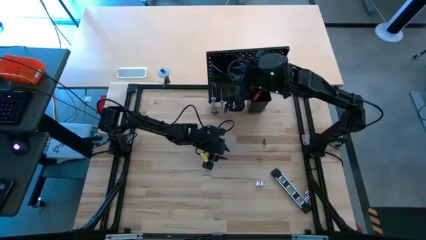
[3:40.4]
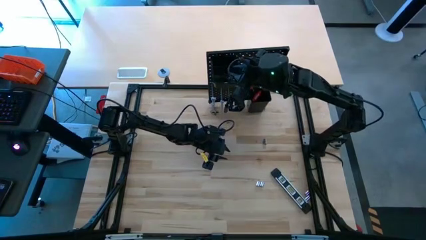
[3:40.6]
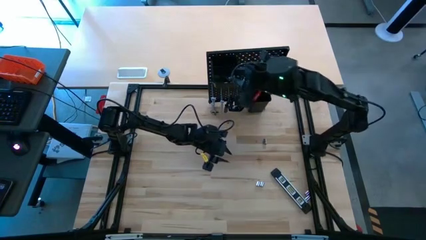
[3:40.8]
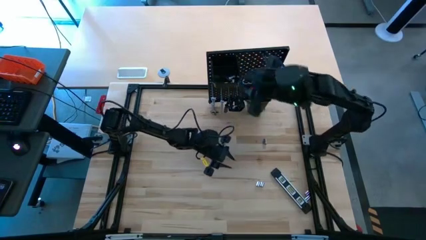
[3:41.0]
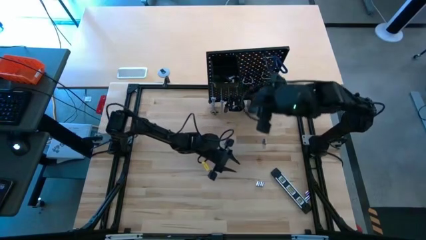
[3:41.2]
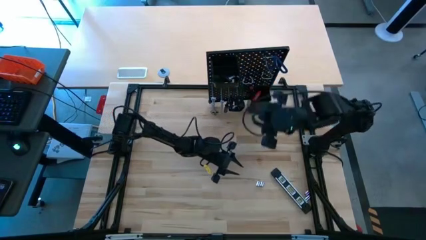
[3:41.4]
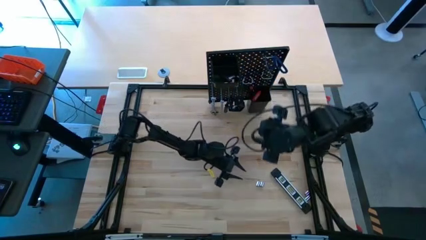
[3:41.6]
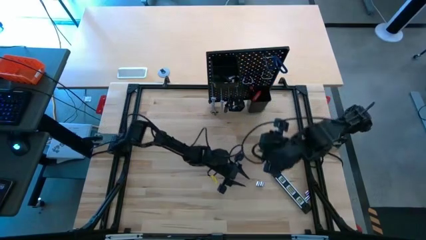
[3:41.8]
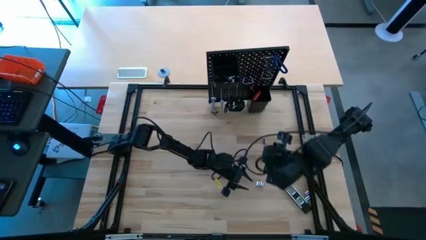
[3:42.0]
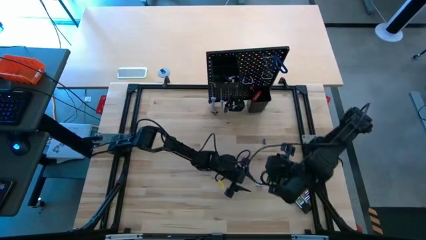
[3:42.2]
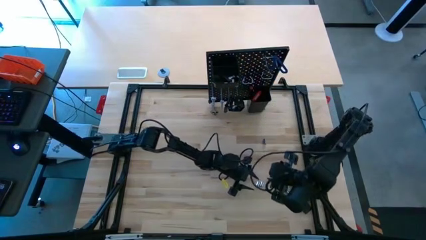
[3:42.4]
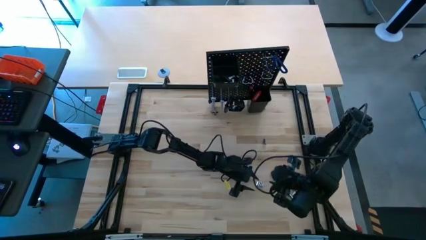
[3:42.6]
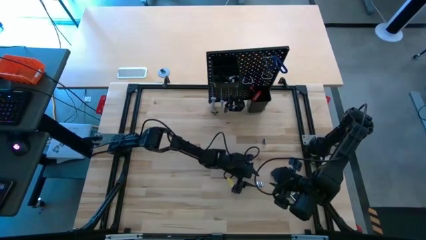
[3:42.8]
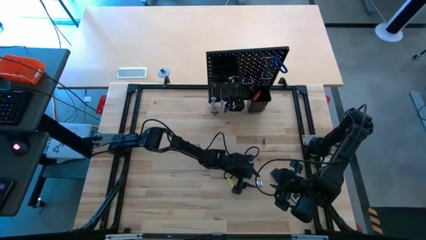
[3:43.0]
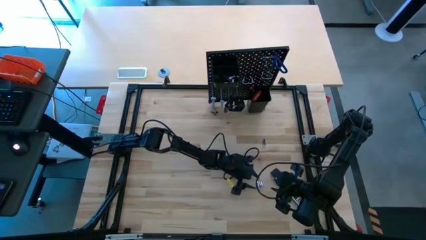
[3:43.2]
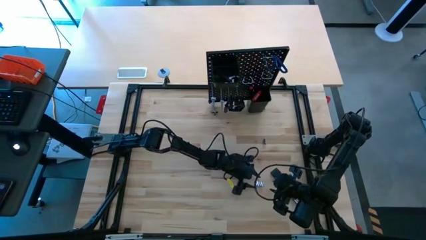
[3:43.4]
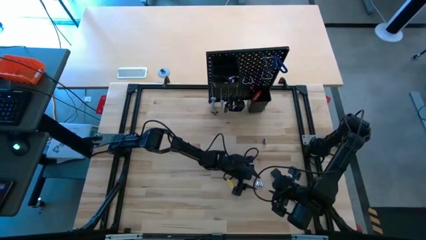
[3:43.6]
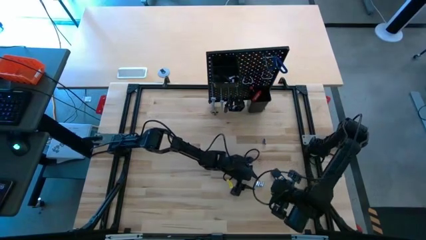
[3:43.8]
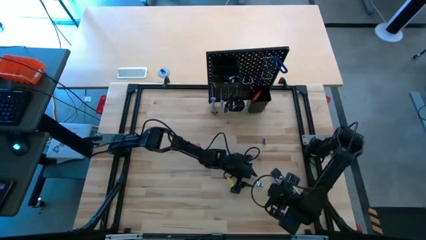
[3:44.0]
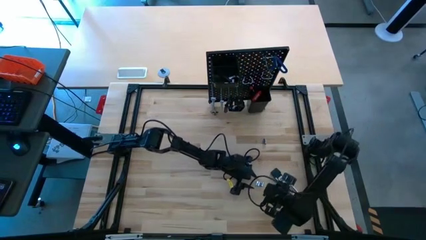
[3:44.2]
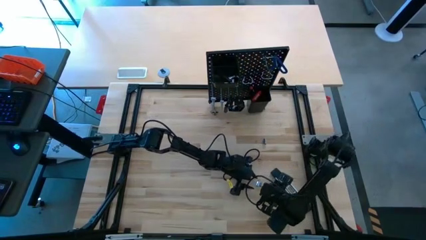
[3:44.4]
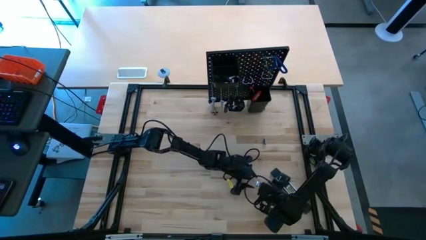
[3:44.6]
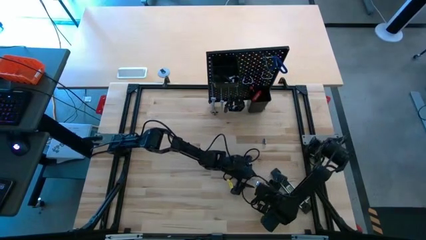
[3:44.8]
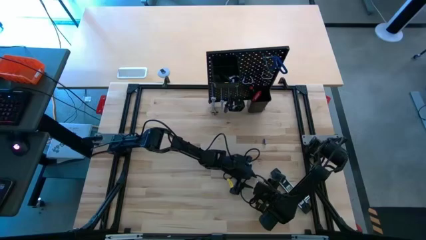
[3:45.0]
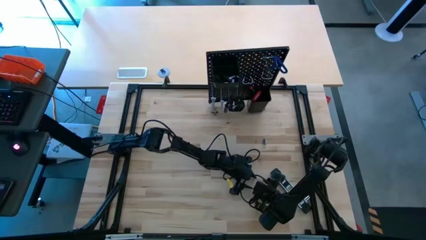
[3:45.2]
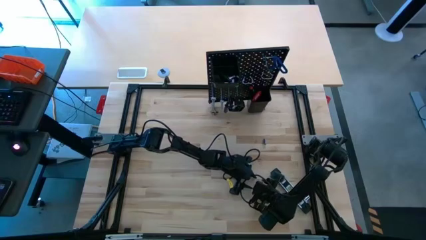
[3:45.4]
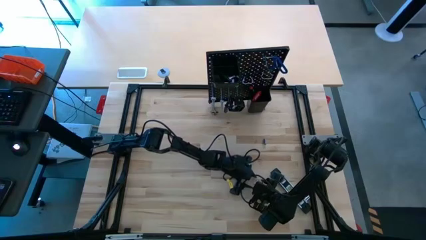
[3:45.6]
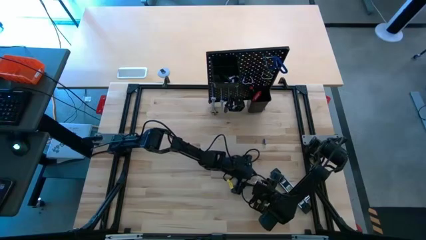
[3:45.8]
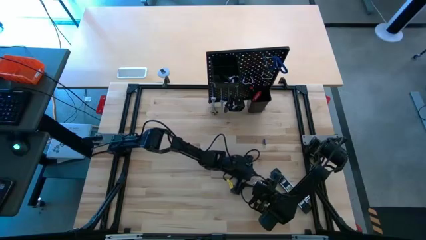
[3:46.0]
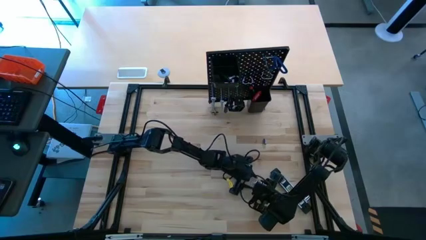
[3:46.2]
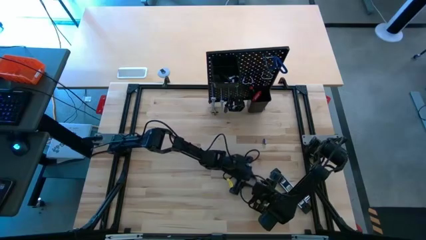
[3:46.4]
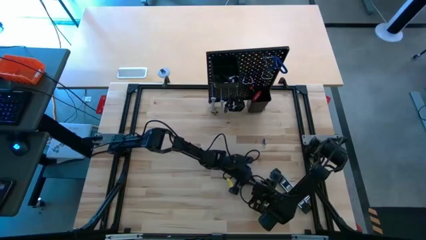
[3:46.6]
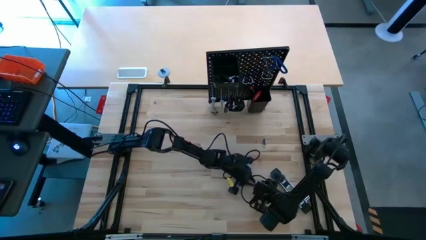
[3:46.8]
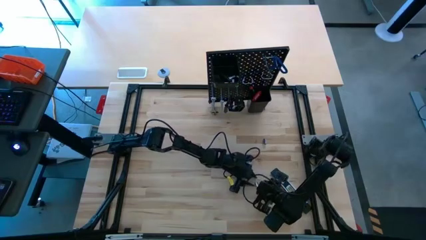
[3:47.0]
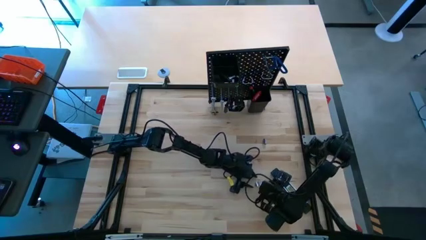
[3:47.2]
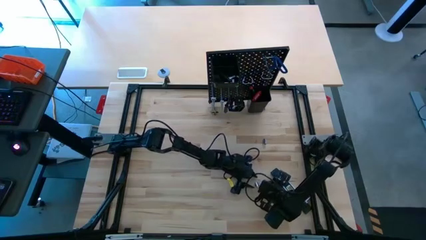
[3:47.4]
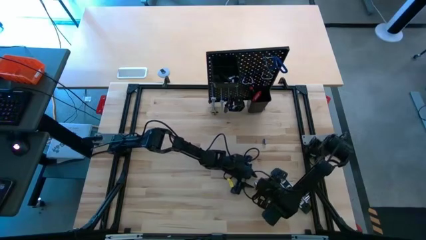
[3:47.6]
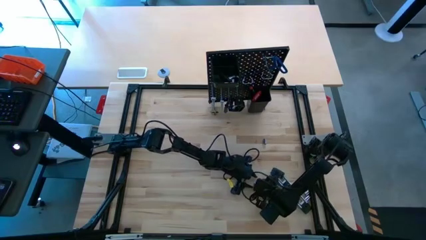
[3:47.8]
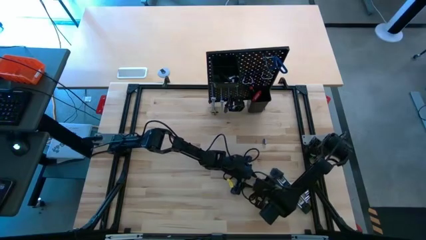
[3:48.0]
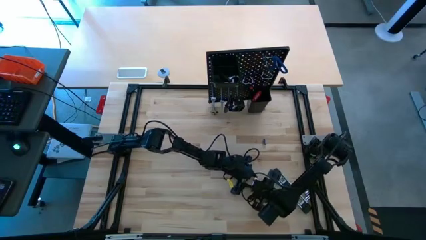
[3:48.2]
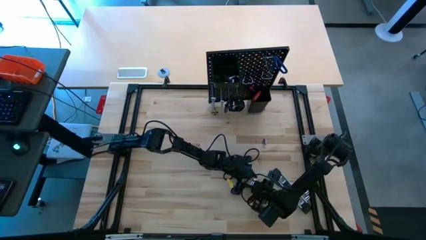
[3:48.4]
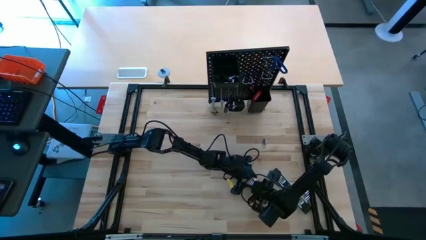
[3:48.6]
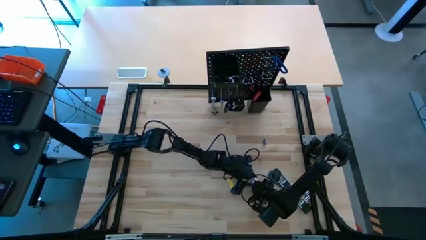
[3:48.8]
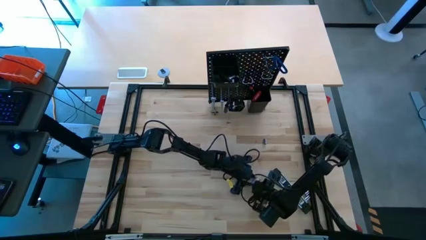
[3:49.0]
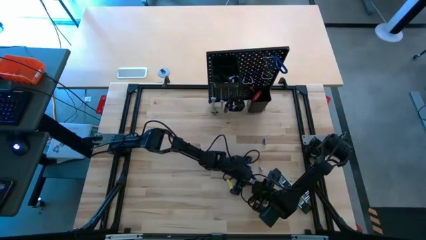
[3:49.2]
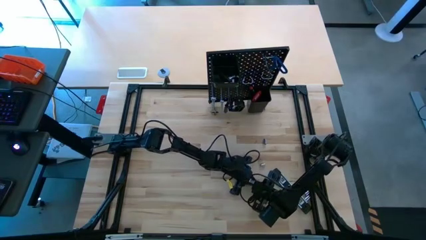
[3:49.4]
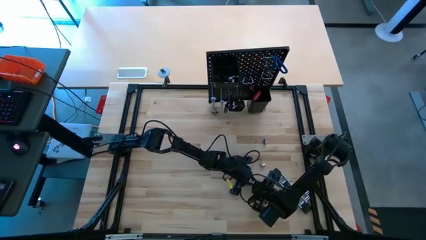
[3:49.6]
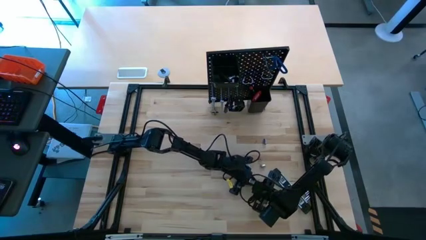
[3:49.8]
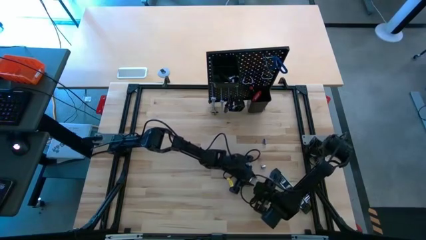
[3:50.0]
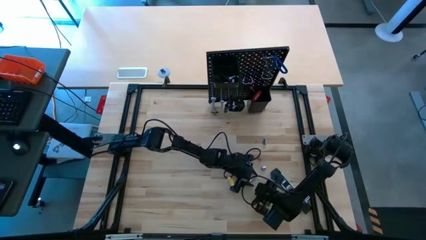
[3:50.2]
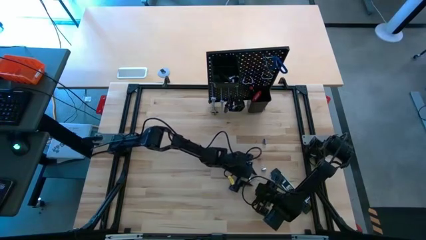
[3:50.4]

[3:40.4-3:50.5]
Task: Hang tools onto peg board
Put the silver socket into the top black bin on the peg board

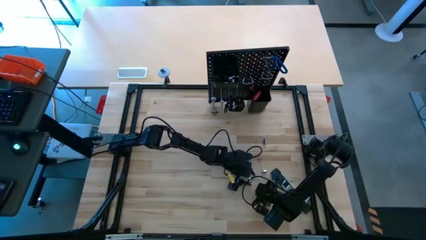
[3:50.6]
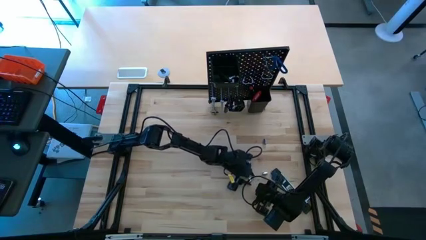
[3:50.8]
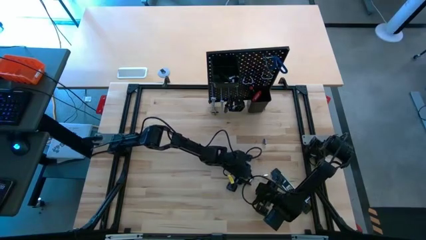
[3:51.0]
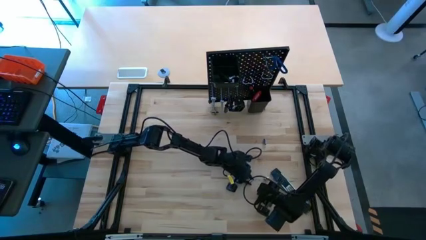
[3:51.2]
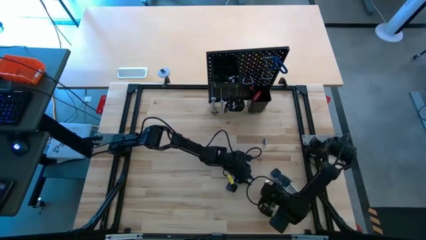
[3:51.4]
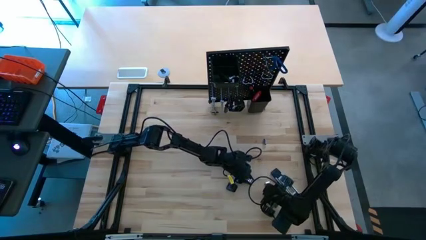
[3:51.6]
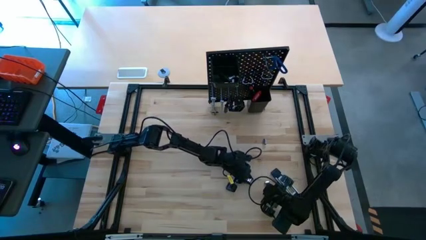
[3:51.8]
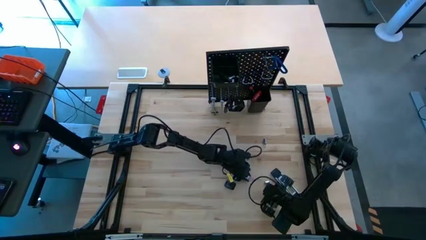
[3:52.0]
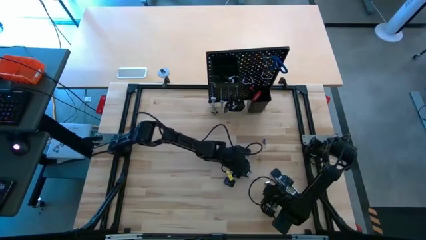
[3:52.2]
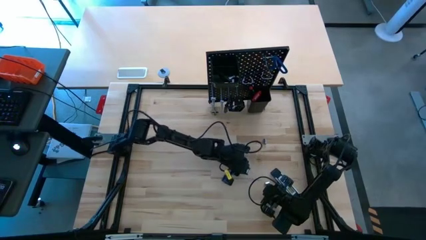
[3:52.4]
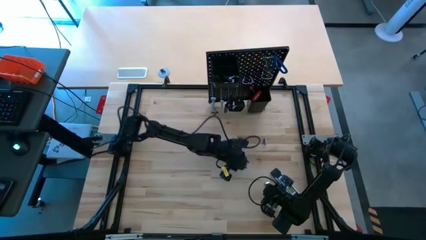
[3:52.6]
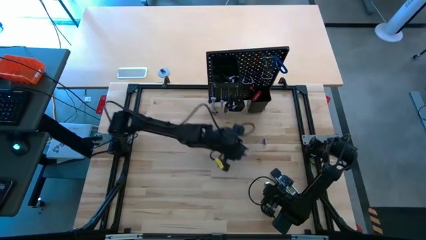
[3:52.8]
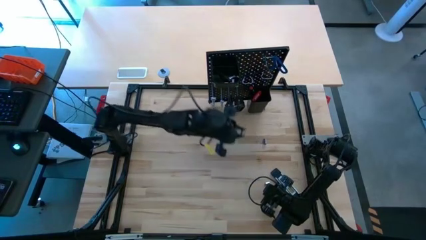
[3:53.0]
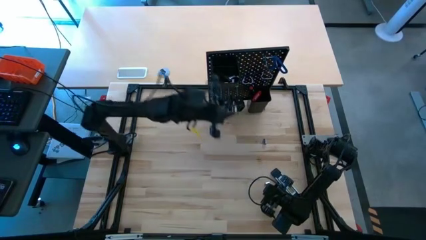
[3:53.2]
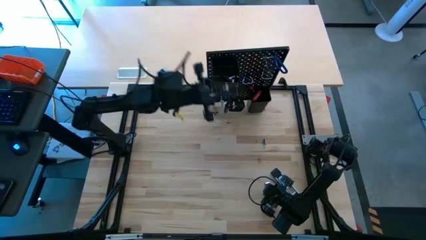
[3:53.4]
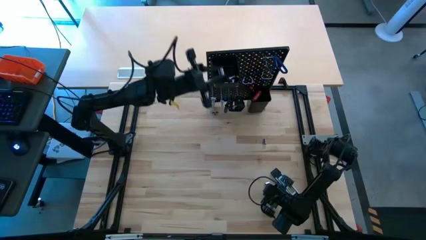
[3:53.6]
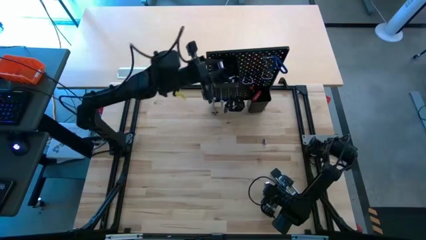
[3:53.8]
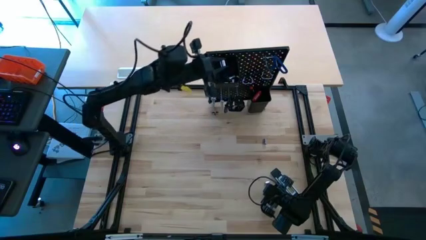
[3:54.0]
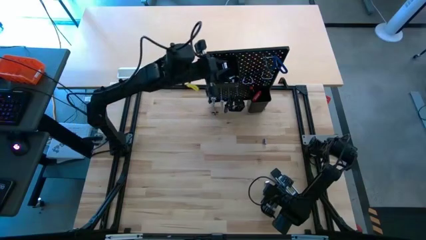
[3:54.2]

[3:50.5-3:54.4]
Put the silver socket into the top black bin on the peg board

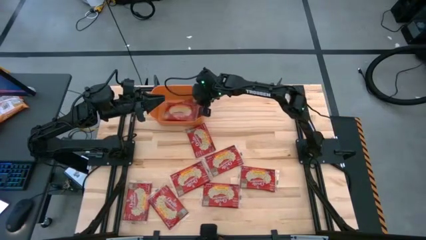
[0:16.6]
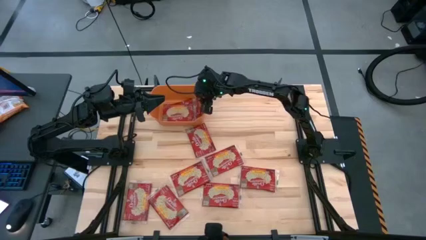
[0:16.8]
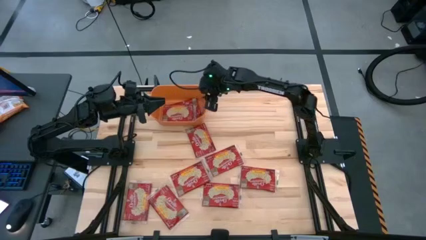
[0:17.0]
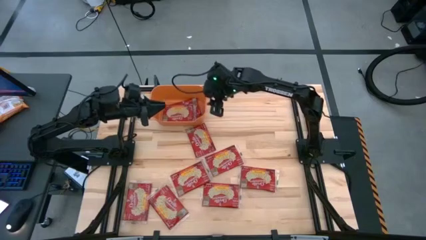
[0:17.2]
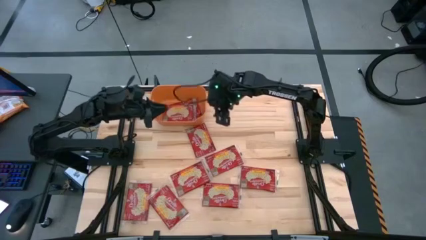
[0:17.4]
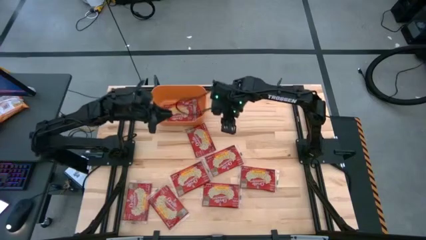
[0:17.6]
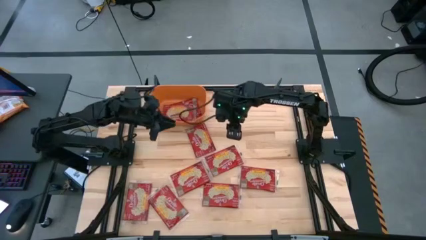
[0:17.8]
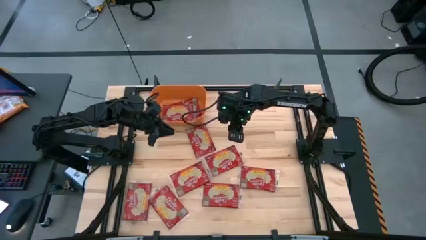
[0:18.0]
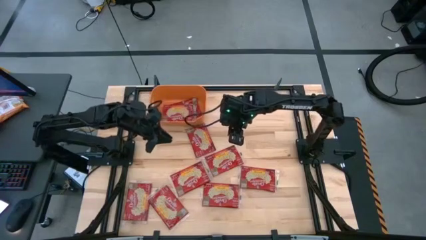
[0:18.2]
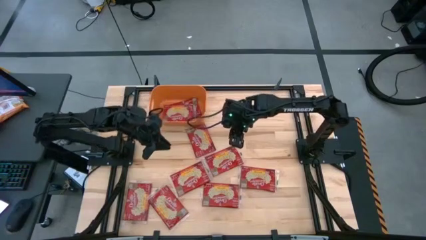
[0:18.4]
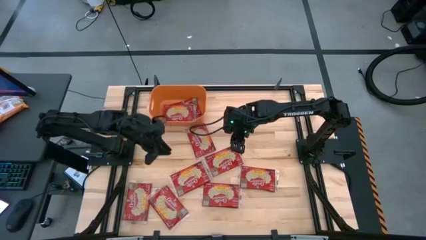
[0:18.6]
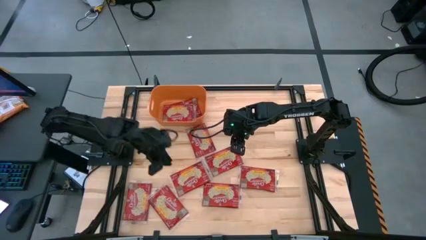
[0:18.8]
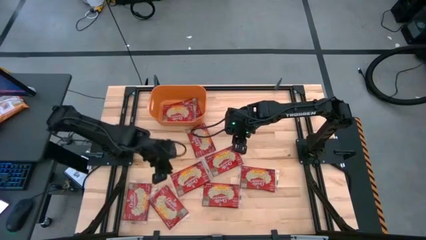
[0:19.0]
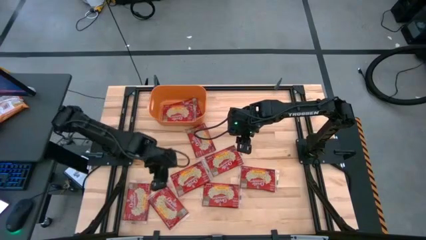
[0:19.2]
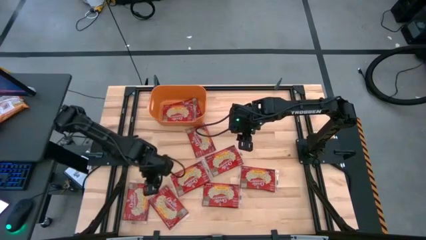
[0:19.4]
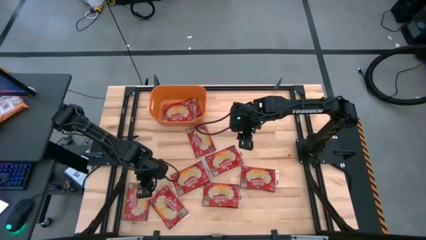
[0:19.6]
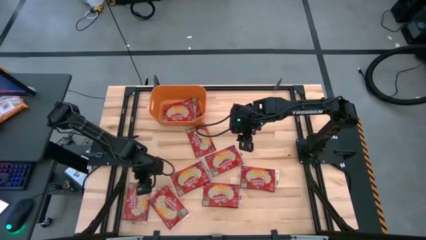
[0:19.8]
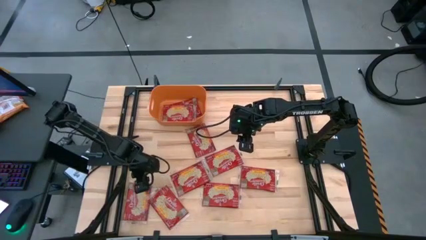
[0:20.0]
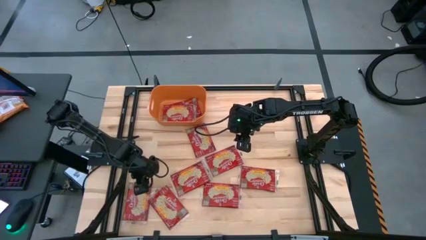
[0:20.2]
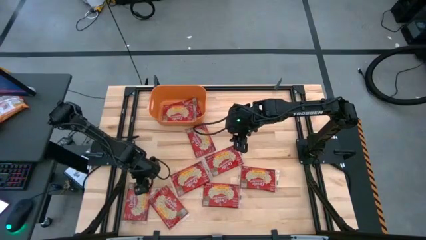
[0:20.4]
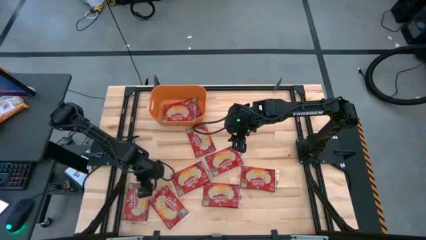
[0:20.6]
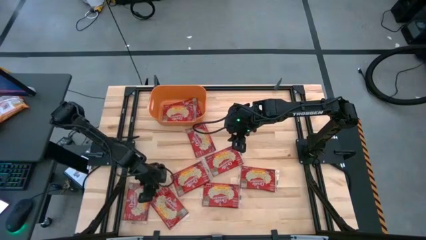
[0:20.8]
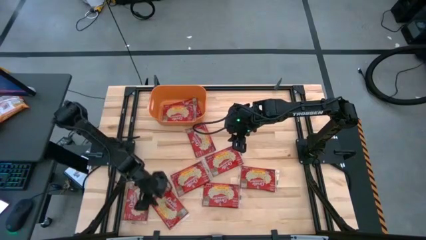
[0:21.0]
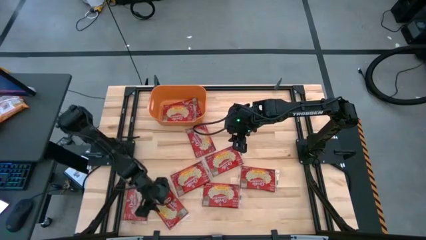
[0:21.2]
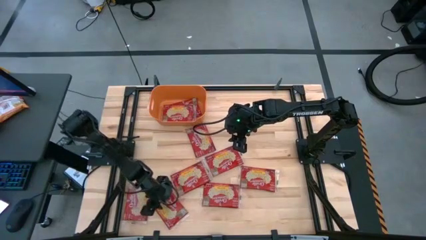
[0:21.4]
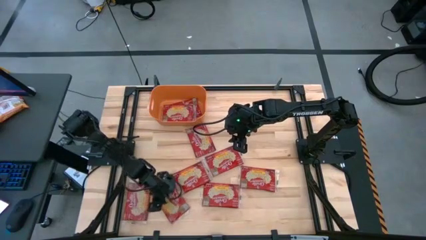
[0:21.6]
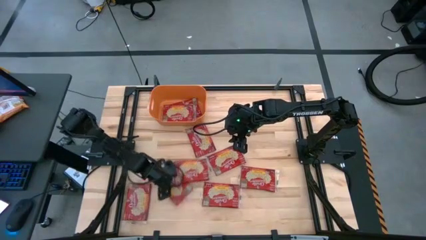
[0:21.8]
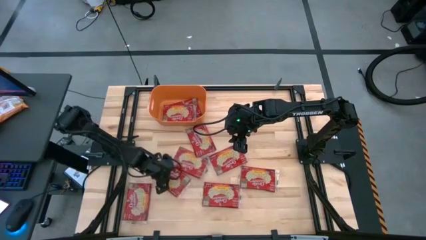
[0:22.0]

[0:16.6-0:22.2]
Task: Sort popcorn bags into baskets
Adjust the red popcorn bags
